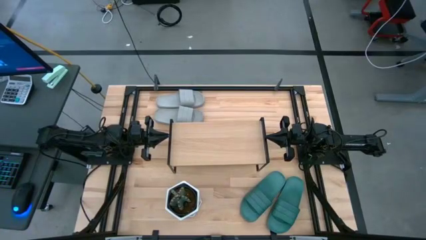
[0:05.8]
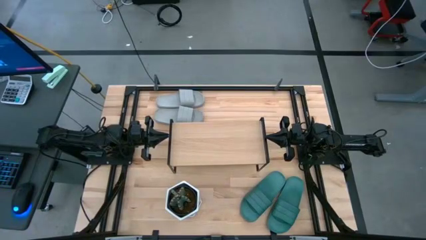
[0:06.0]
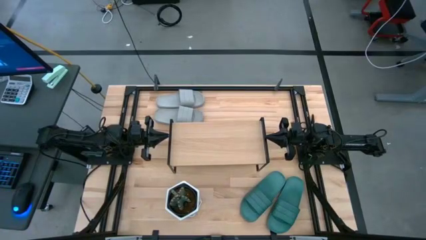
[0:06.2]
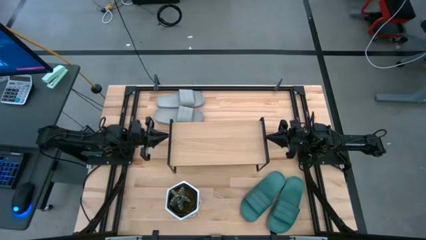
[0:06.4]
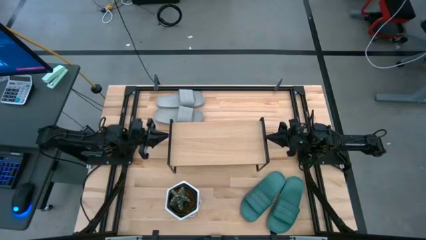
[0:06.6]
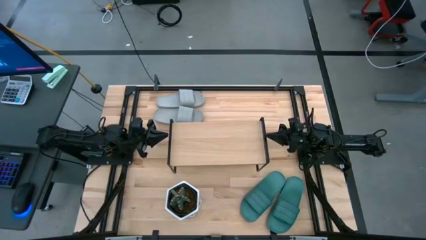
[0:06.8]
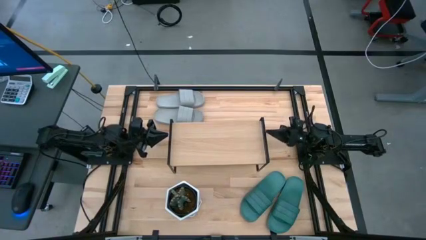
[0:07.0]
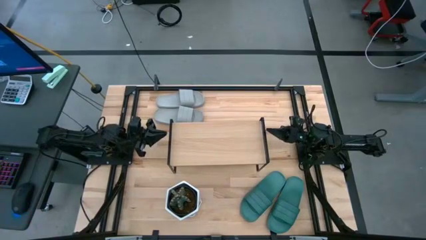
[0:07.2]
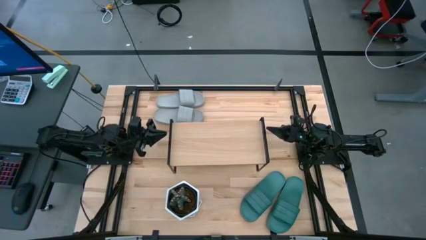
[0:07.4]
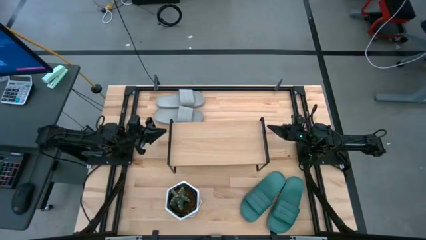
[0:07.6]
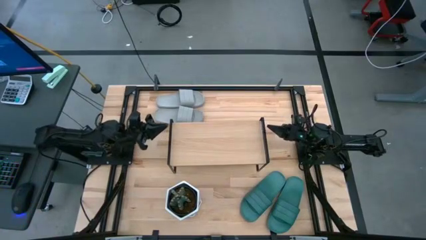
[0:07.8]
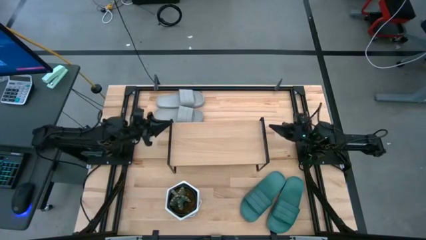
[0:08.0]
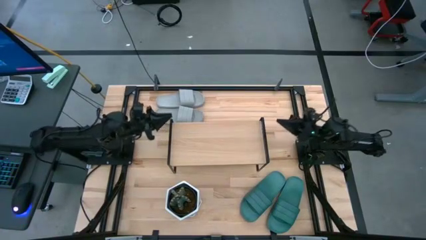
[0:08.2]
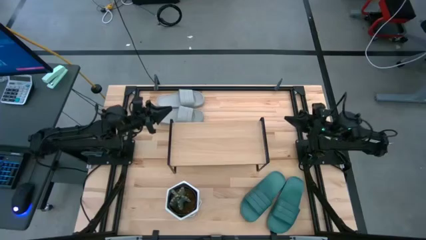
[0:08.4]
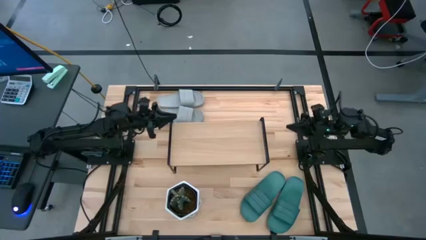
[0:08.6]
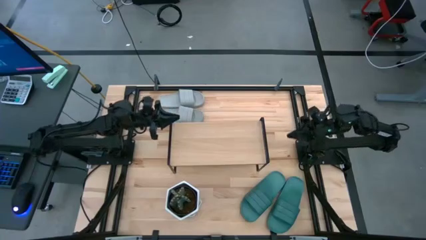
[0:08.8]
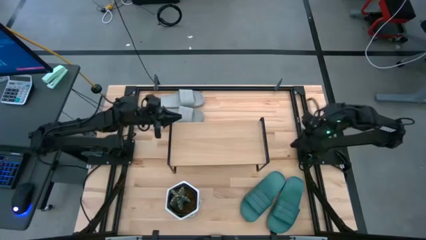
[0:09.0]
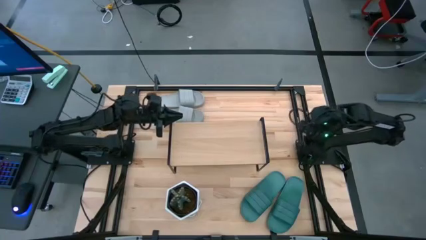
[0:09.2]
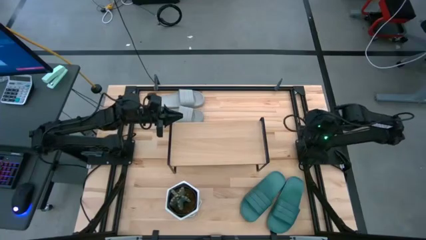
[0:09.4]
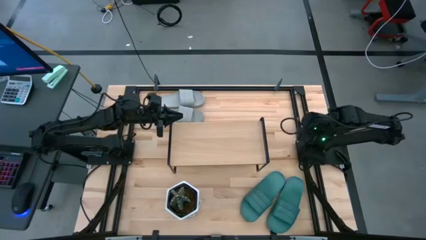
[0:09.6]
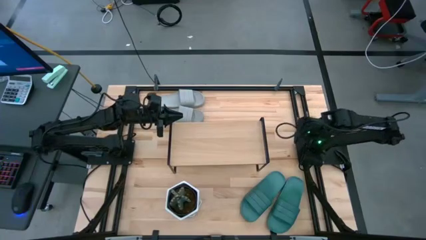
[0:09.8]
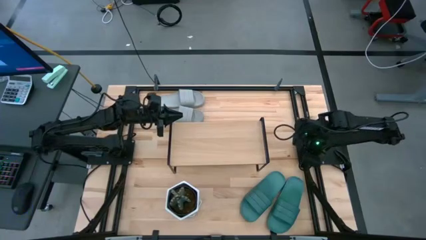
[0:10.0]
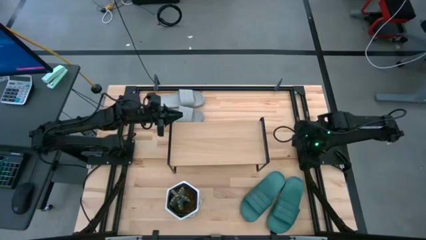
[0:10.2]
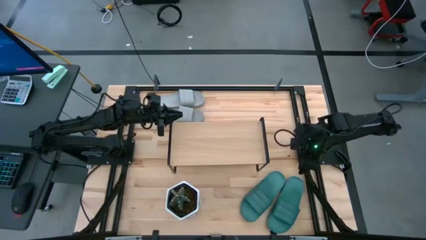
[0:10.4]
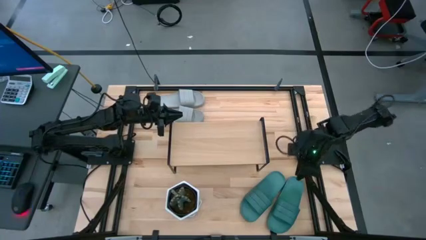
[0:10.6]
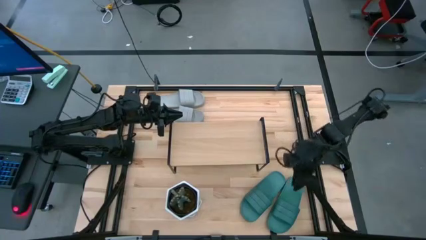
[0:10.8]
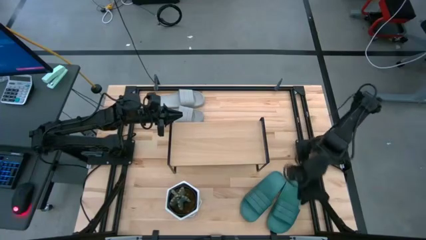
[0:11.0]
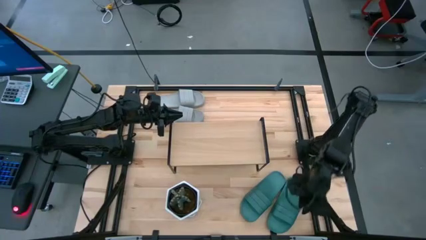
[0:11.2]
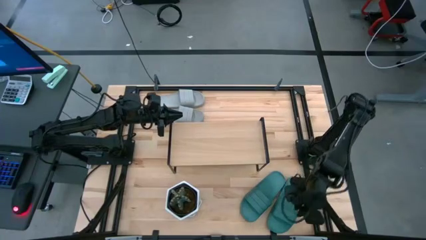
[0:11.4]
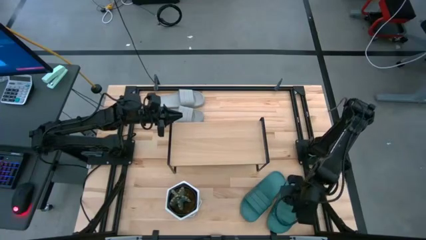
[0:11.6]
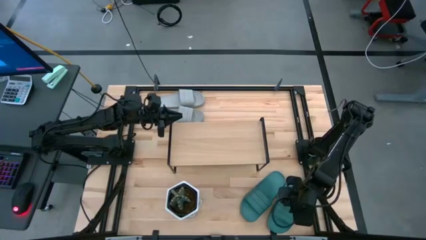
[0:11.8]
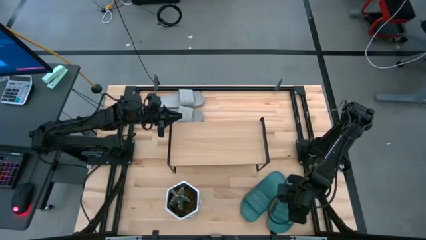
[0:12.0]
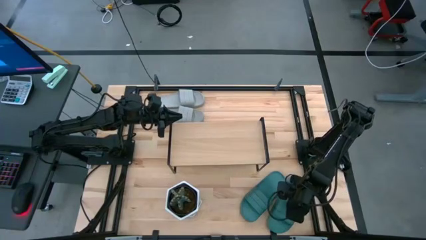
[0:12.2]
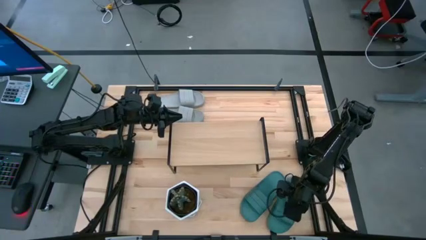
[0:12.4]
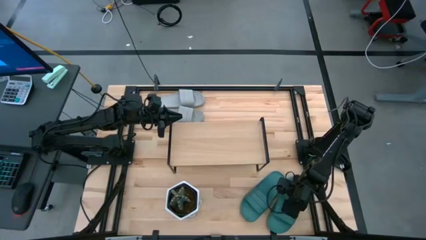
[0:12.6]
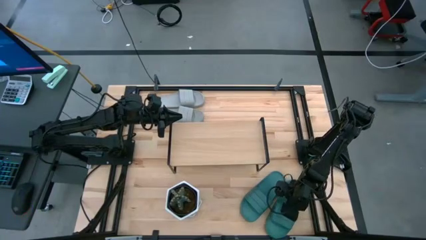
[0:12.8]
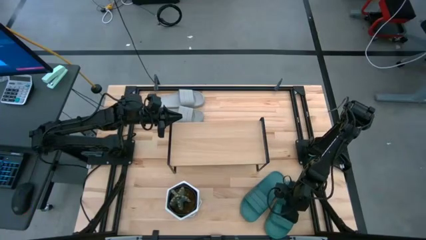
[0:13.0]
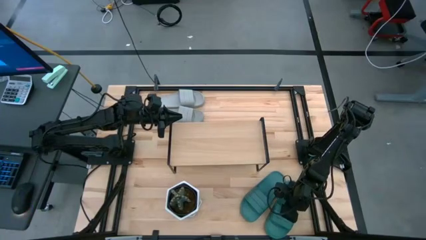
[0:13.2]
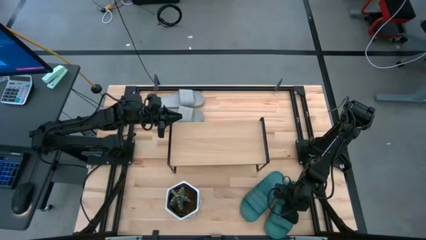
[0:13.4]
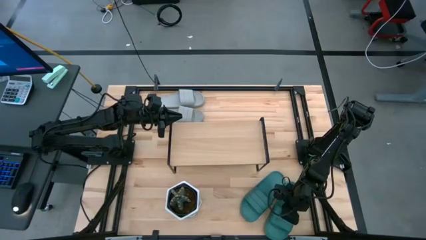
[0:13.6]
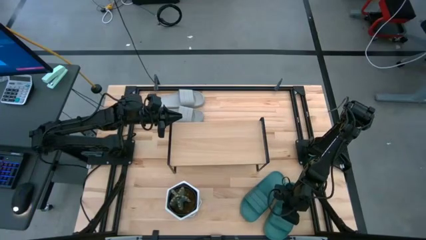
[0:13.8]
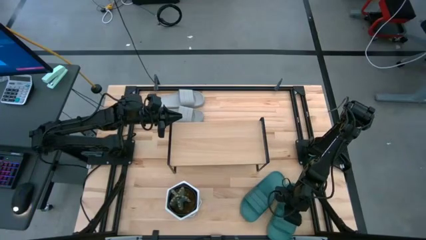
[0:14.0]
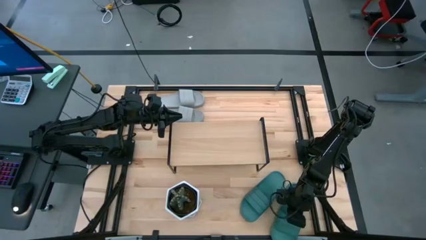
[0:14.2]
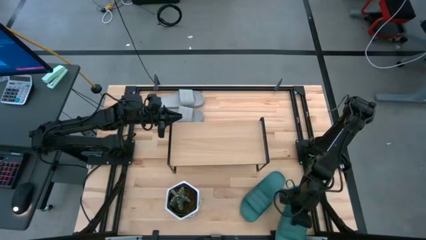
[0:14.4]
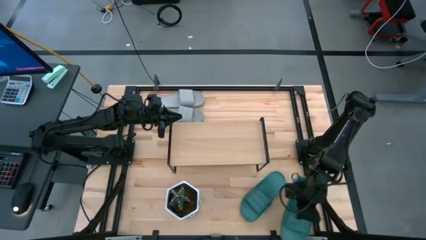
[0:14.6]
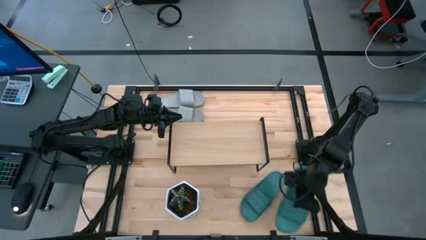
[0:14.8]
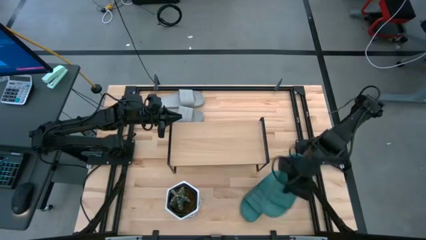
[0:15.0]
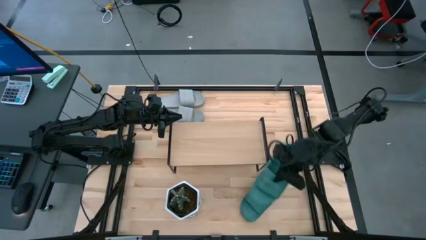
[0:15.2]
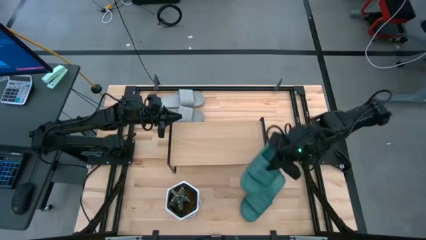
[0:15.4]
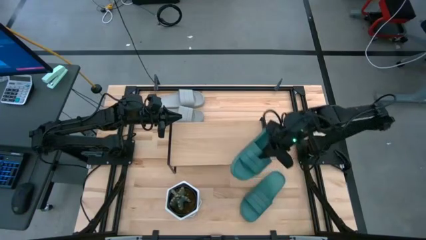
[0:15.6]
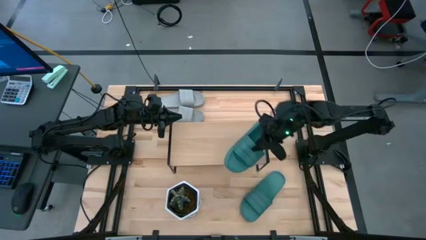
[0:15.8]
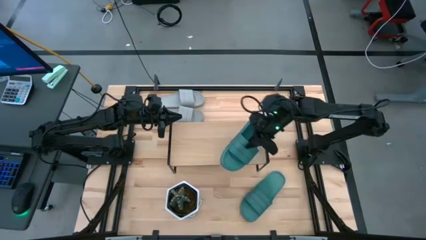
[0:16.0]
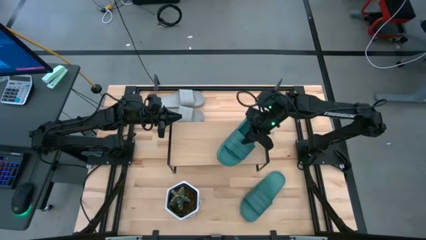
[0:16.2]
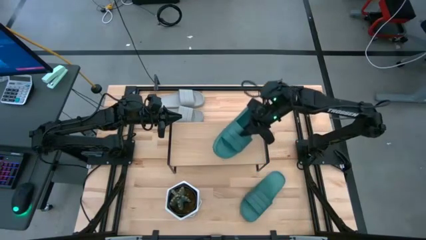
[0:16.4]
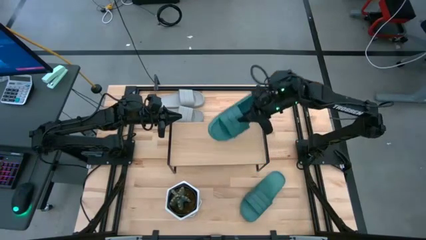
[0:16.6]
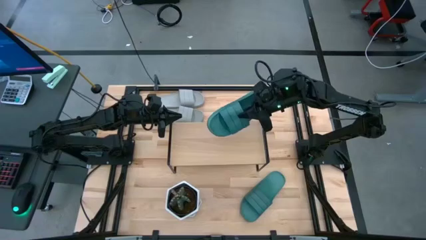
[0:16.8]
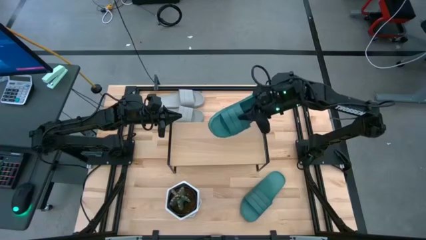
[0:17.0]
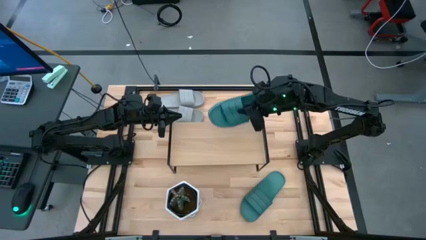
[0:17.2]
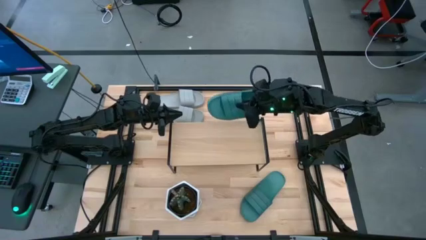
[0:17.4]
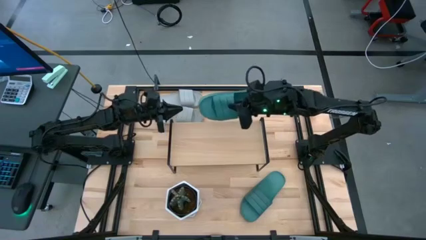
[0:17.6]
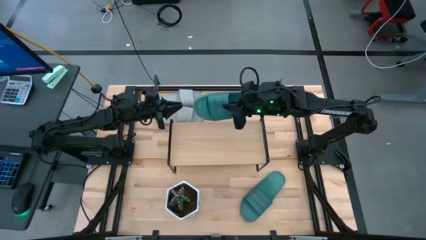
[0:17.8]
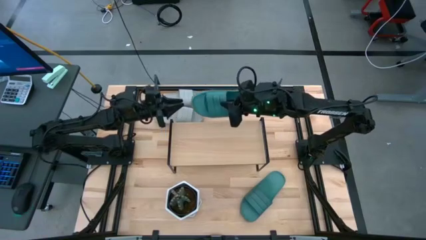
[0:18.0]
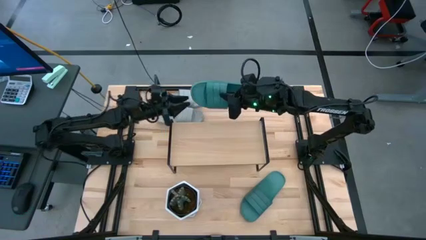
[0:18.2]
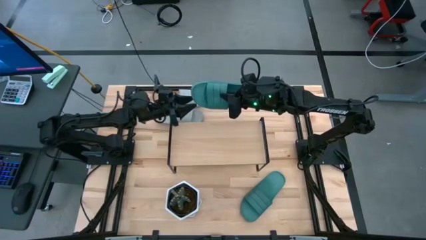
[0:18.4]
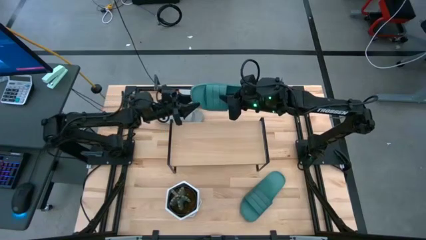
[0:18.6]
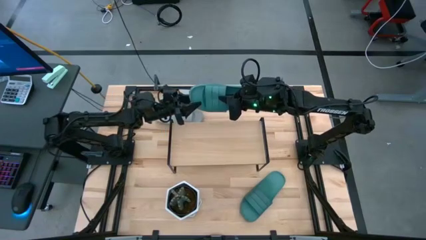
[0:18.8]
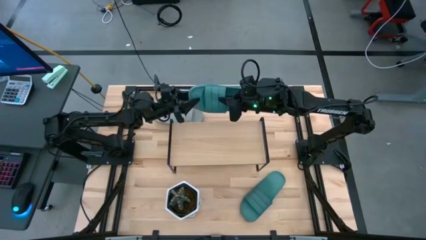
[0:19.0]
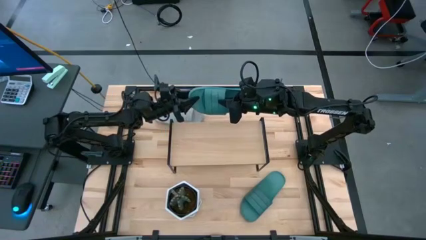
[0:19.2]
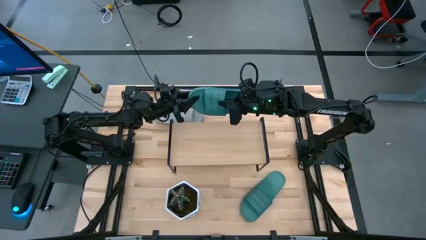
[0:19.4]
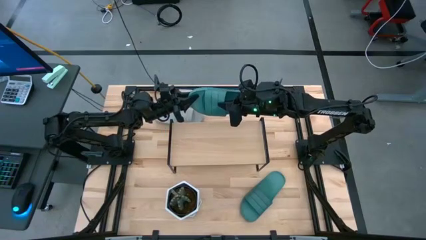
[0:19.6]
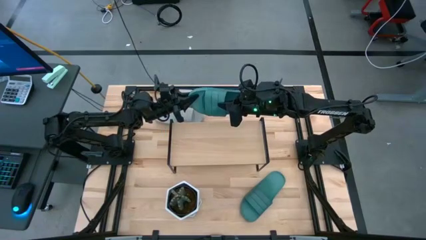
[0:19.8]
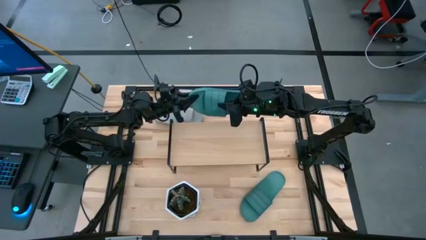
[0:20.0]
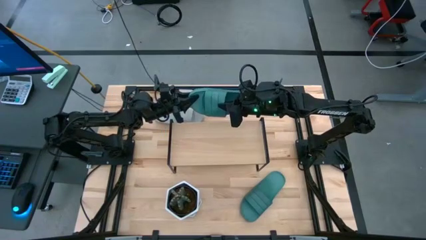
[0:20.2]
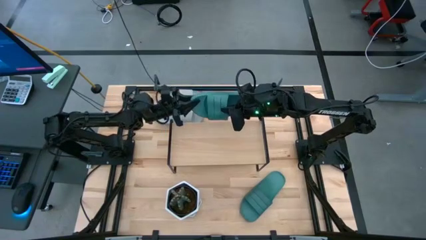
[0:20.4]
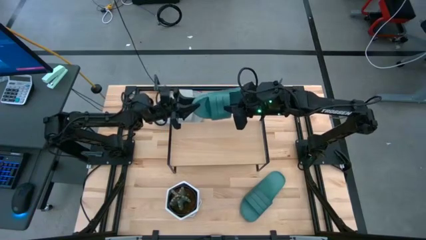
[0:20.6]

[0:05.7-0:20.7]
Task: Pick and place slides into the shelf
Put the right green slide on the shelf
